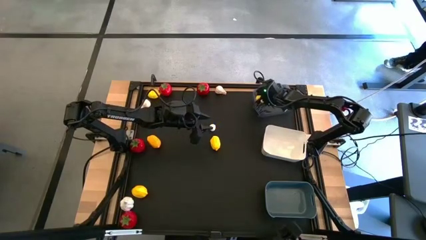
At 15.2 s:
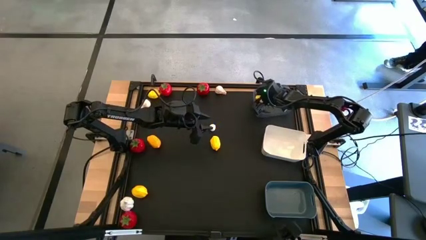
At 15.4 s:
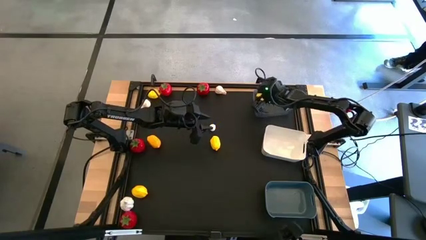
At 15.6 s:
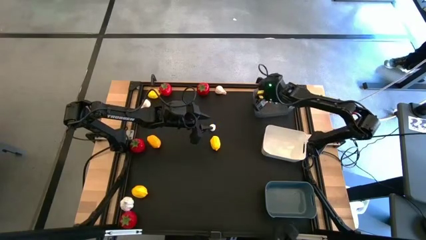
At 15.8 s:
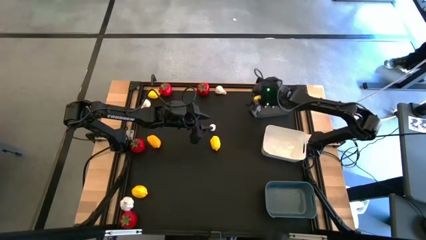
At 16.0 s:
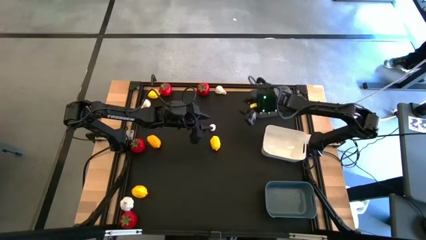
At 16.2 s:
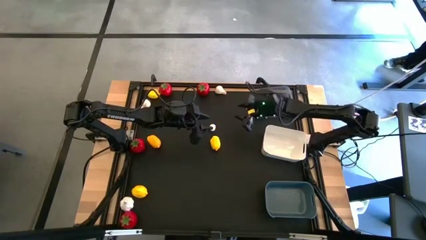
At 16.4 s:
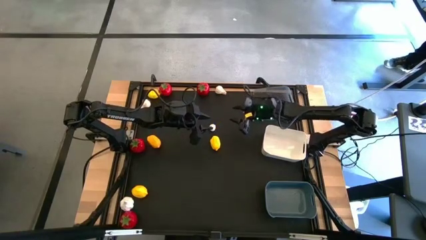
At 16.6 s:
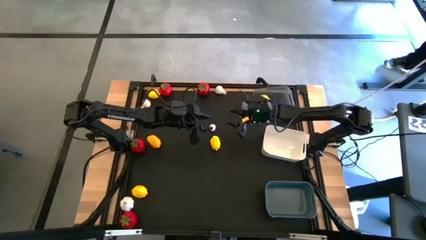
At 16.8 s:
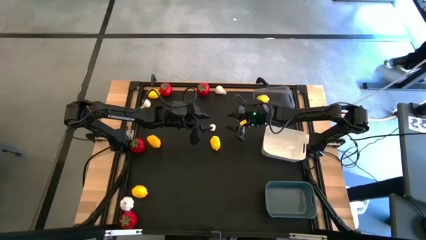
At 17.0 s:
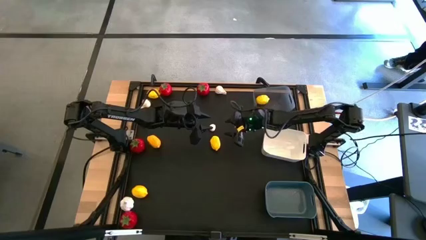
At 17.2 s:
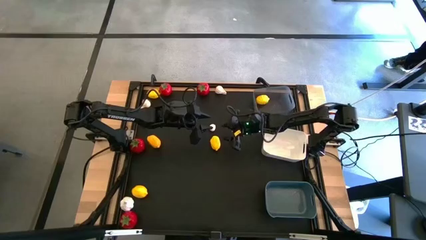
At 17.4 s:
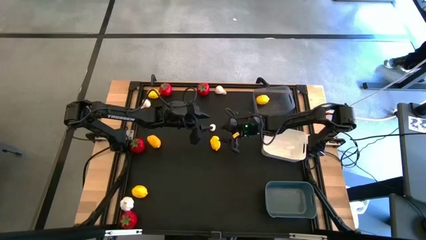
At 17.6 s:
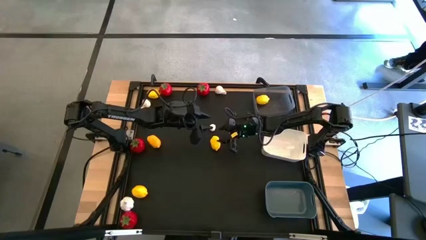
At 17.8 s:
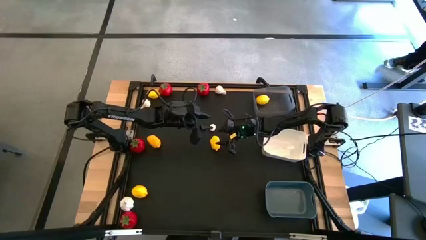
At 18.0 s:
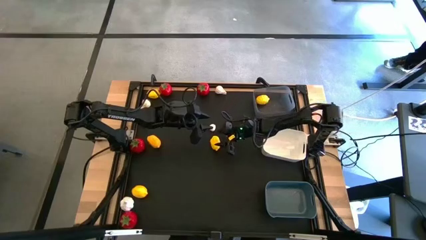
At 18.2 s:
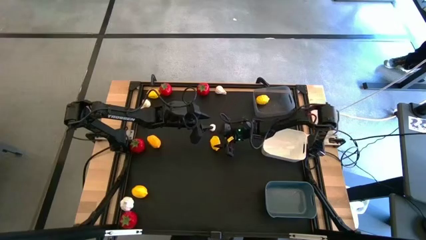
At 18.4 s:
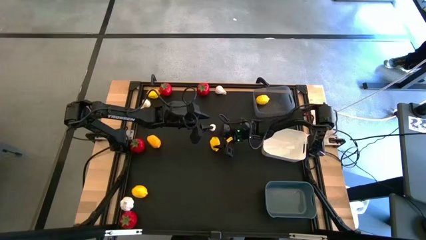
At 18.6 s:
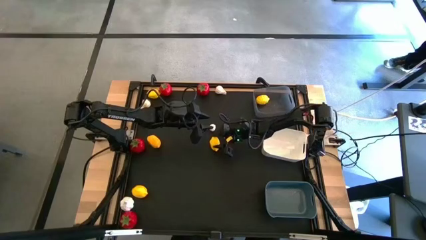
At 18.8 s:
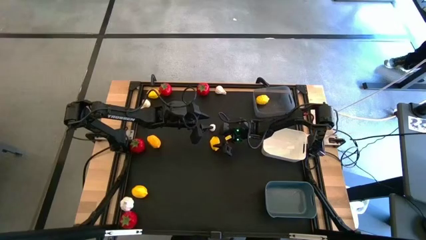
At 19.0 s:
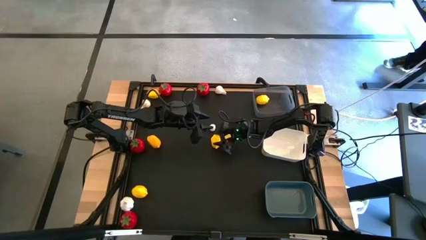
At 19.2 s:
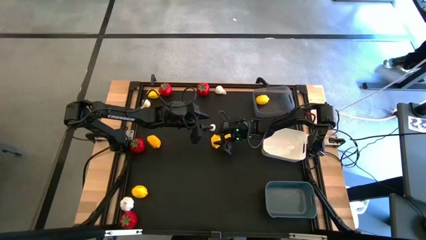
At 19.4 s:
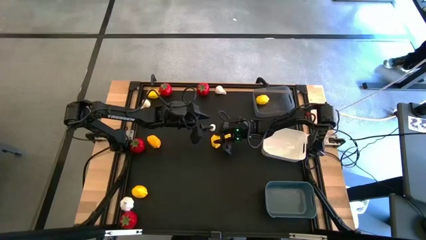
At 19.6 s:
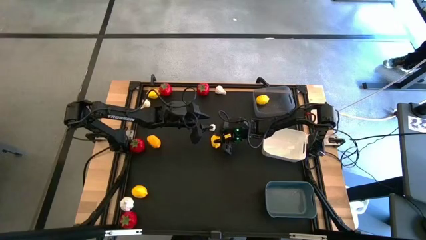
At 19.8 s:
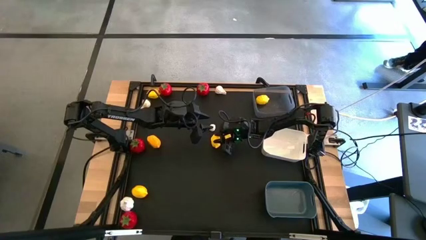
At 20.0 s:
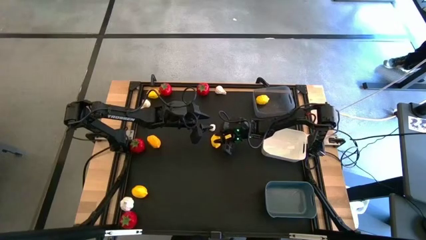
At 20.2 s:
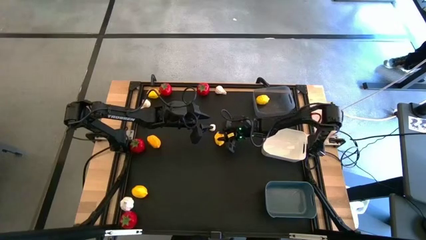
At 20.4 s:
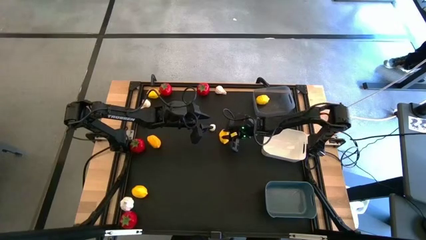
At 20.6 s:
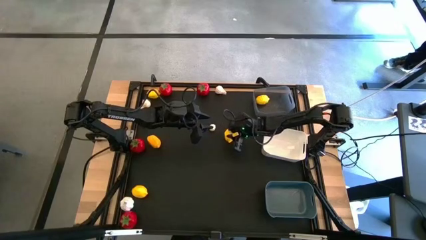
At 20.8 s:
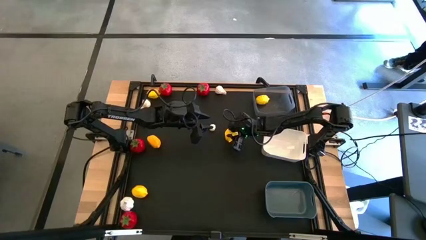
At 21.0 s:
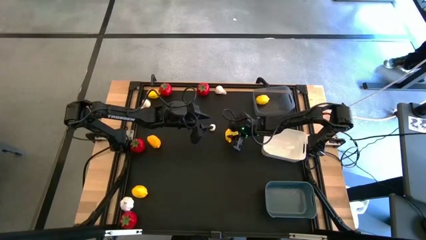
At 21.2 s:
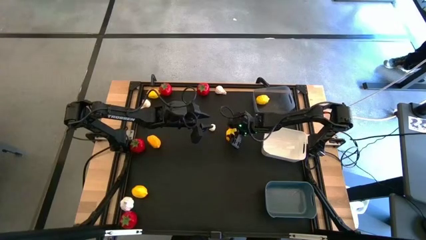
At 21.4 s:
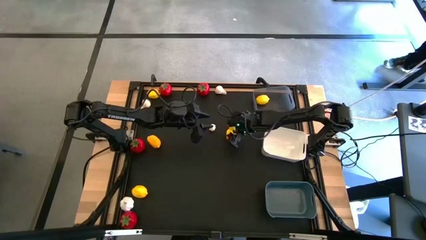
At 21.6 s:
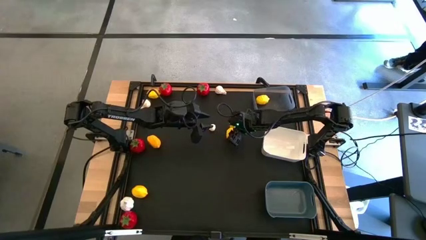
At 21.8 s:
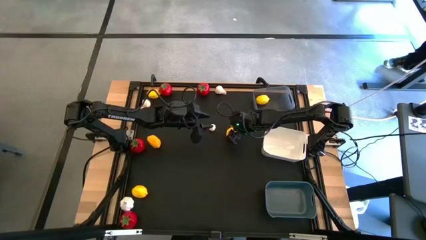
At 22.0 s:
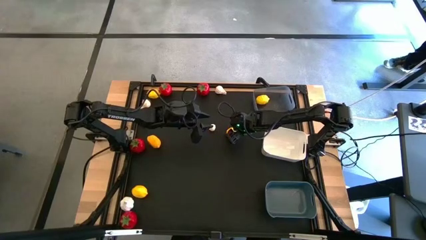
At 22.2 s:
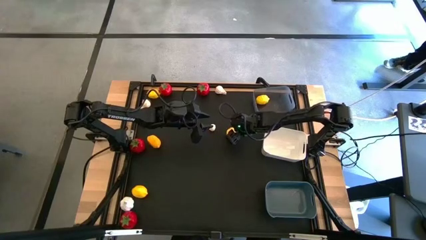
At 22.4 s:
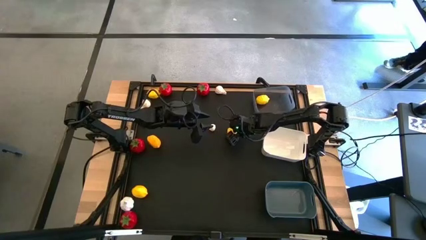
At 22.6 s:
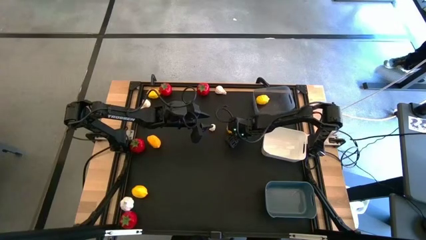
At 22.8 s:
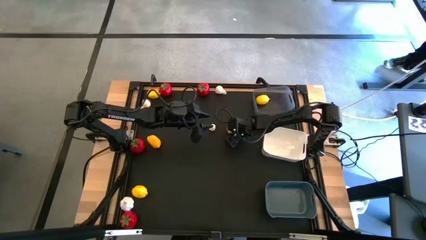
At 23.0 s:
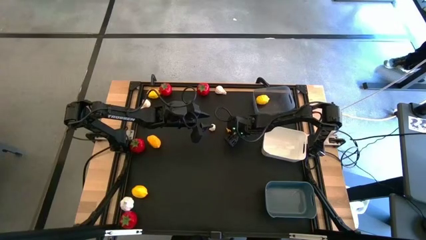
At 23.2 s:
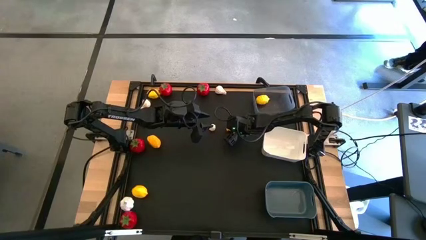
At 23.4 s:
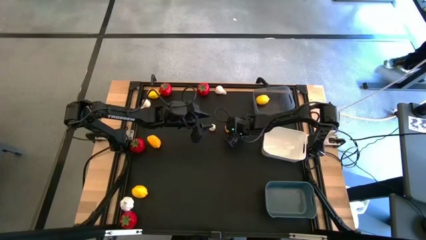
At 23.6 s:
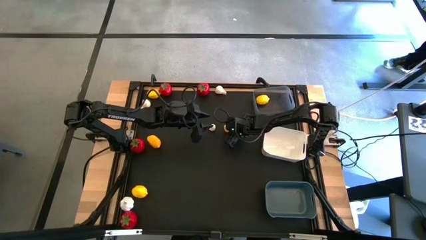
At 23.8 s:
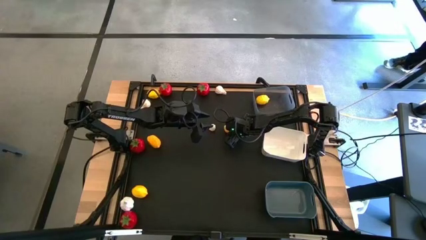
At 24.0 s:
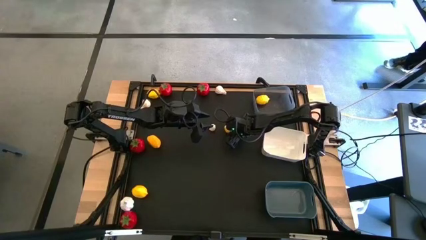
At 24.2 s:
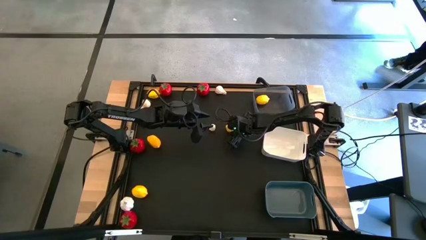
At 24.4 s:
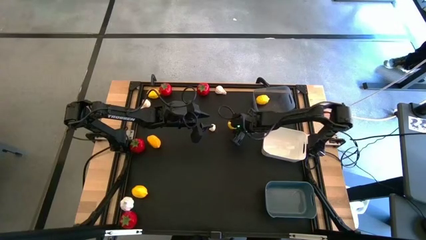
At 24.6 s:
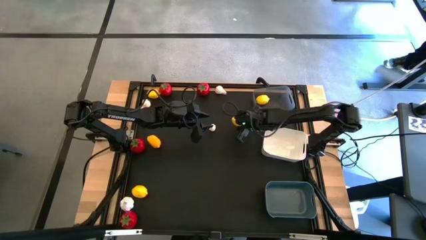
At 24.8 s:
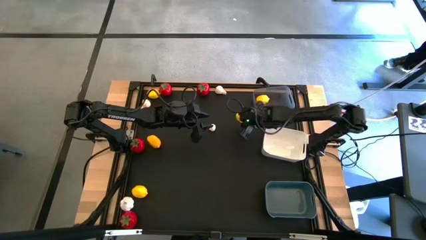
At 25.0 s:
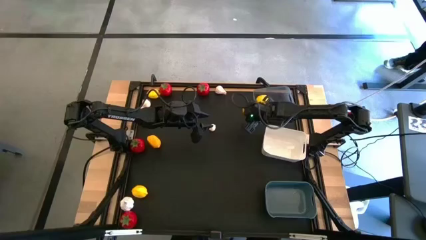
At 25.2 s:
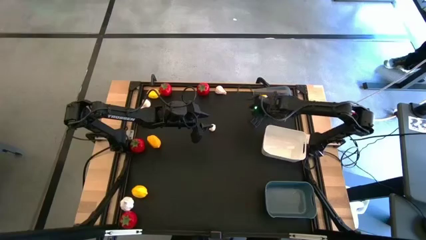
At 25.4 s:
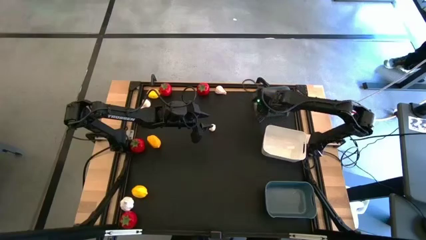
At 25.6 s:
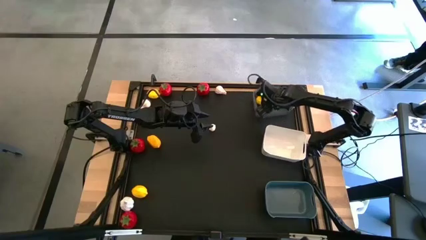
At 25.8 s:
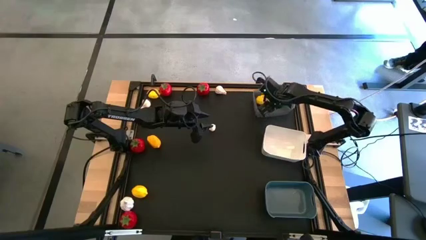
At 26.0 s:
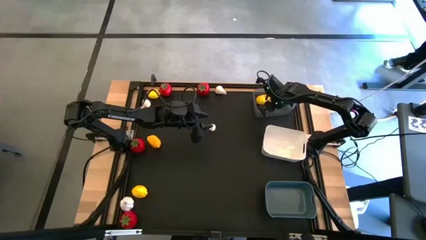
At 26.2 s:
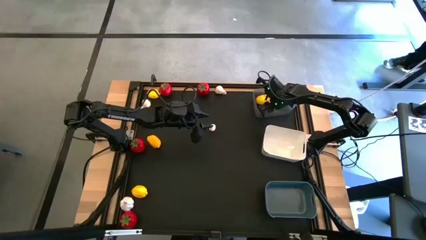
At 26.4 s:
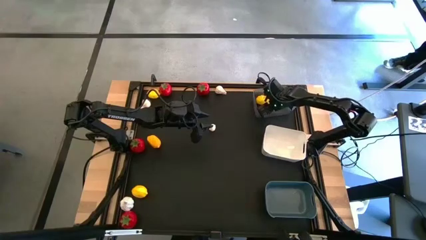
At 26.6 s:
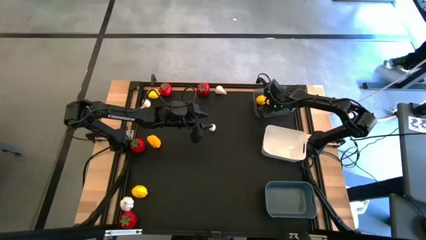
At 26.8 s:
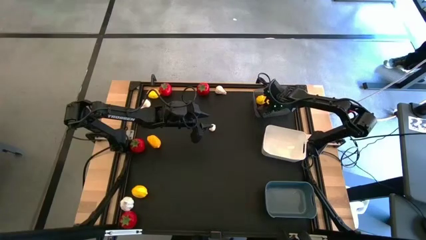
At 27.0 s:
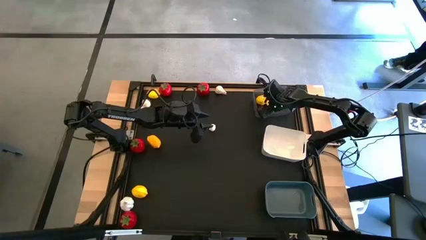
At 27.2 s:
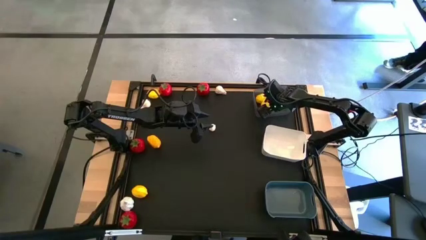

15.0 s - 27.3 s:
Task: Sort produce into baskets
Put the lemon into the black bin

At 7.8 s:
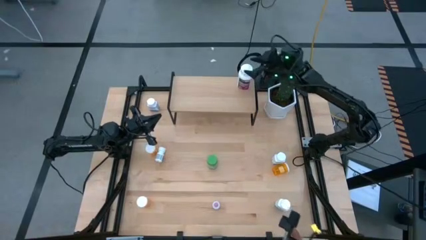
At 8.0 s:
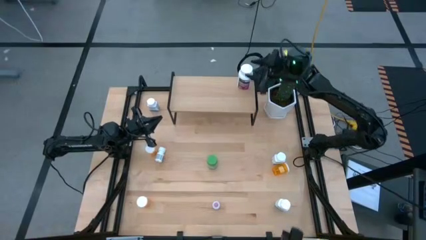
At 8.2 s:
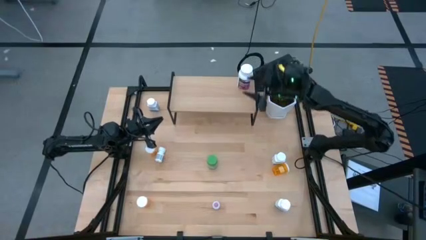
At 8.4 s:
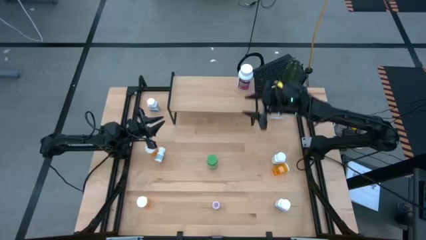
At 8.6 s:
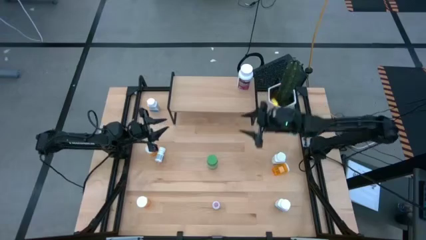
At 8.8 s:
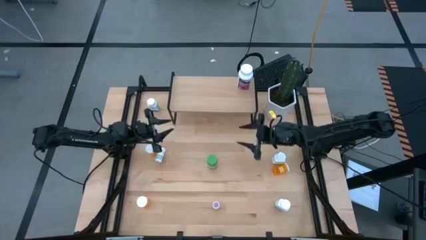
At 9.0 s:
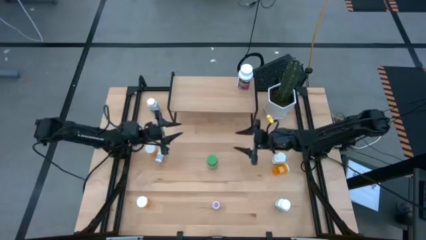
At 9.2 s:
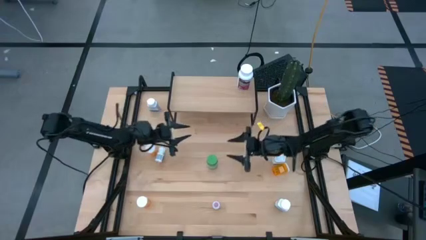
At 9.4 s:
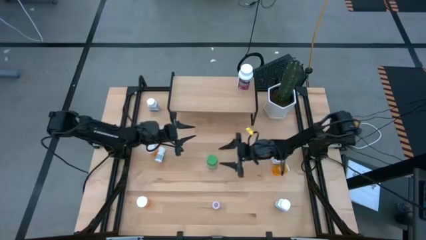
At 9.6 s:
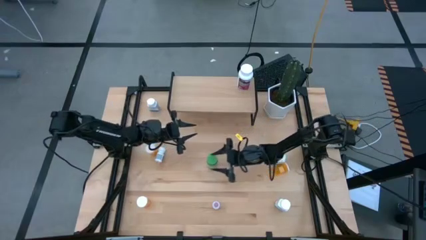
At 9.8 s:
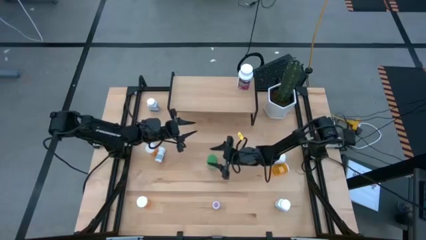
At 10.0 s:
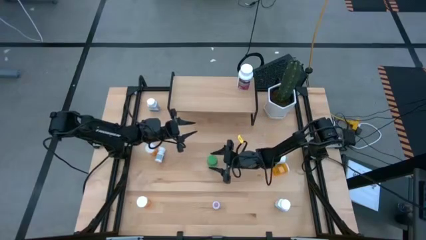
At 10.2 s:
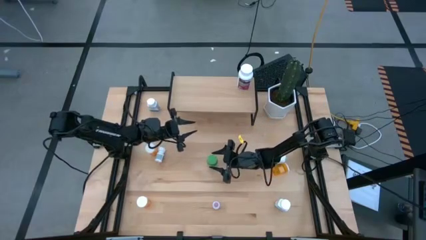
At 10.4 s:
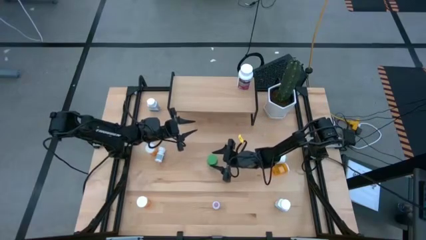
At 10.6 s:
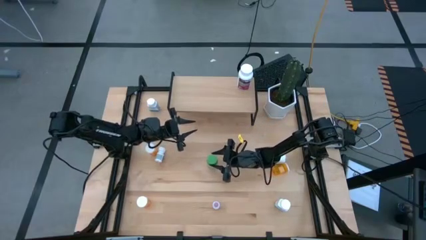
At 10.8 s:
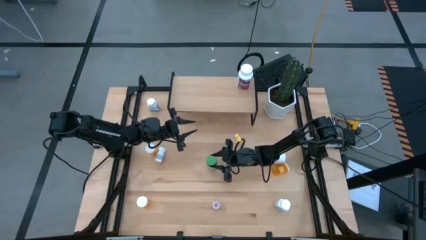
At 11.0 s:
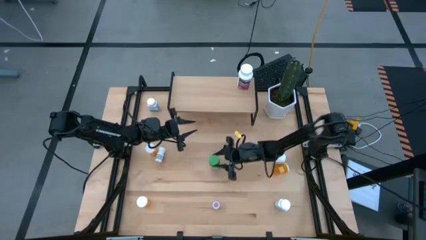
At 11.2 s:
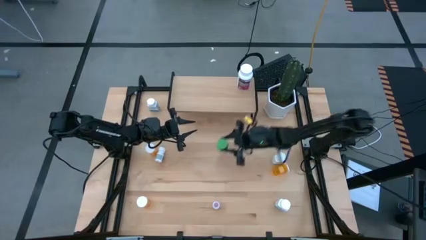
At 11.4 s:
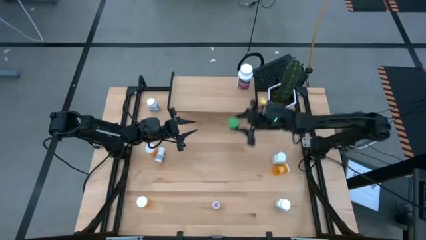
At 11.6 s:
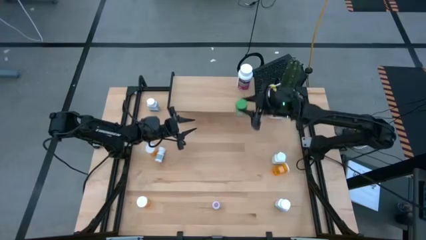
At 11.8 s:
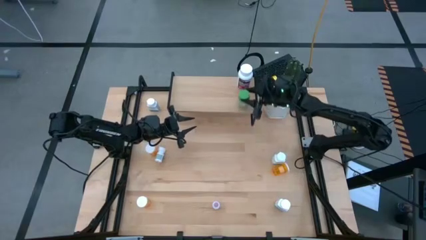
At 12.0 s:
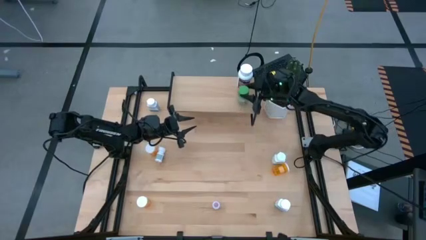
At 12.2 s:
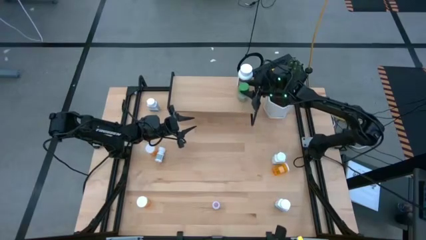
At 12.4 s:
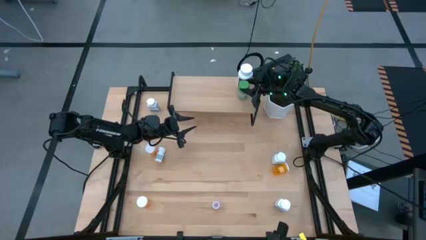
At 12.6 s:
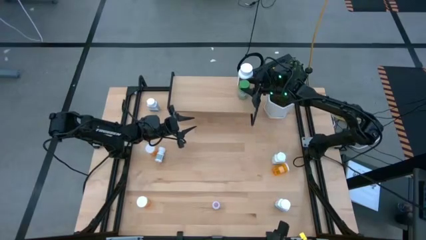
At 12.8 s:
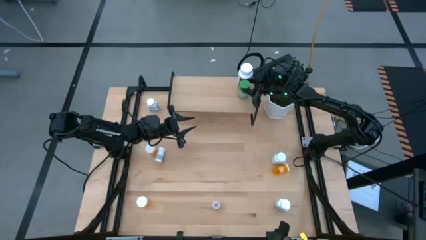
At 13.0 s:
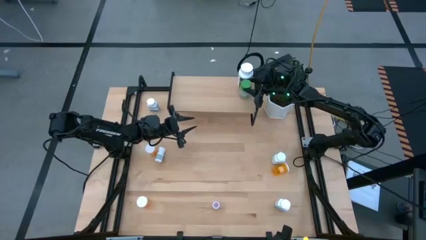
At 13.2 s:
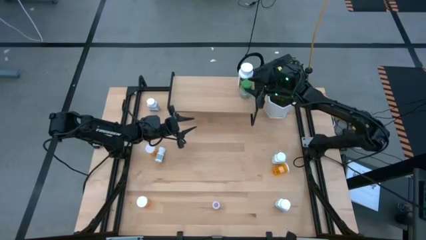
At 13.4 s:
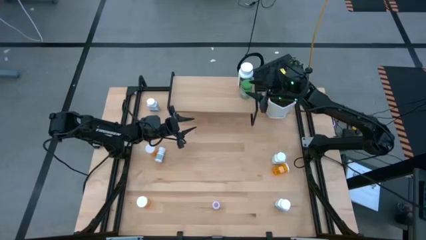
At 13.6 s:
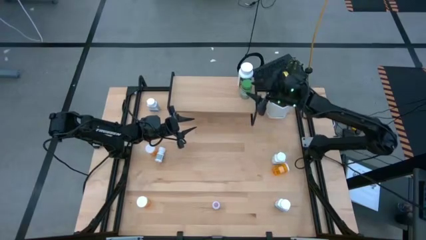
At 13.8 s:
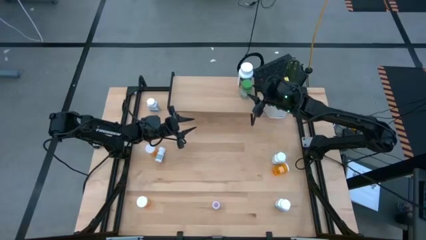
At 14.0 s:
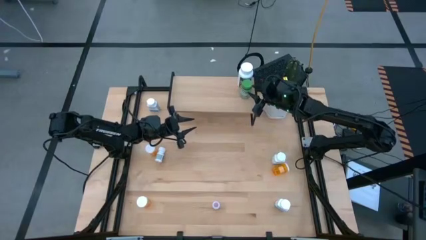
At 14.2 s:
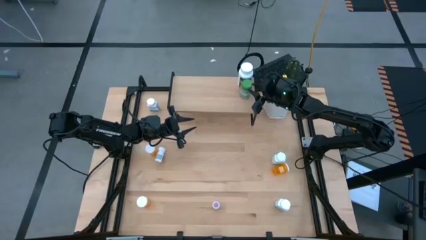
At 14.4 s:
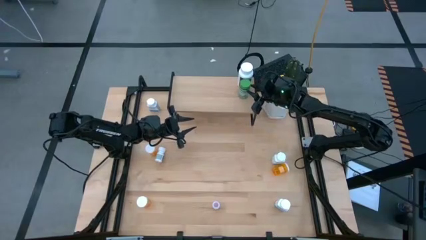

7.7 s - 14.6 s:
Task: Pick and place medicine bottles onto shelf by color
Put the green pill bottle on the shelf
